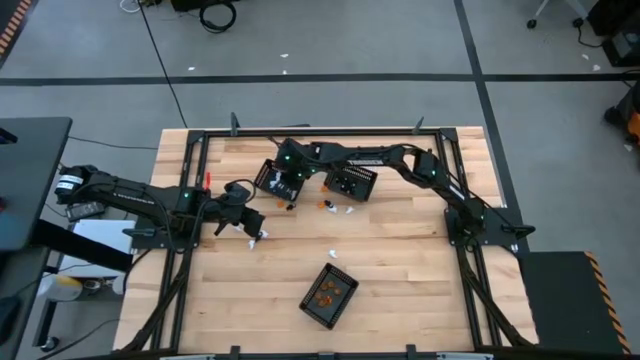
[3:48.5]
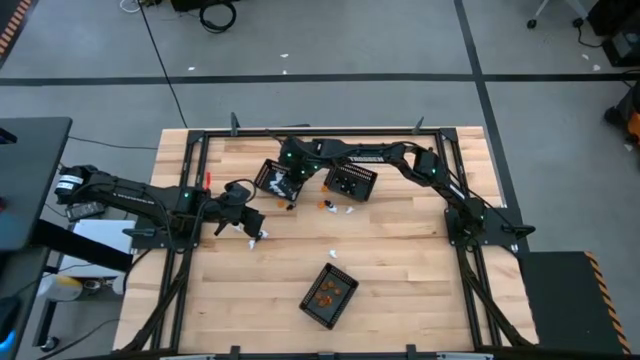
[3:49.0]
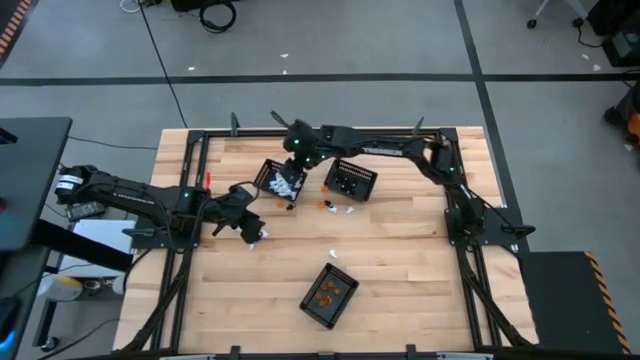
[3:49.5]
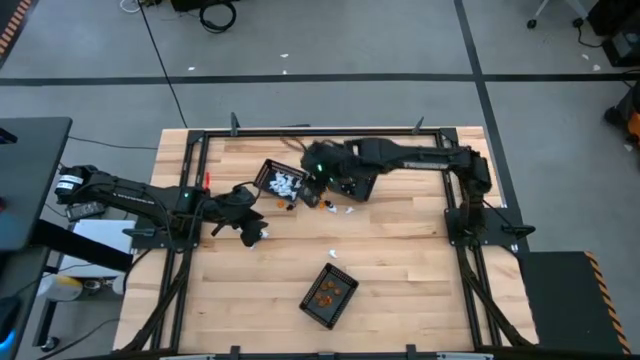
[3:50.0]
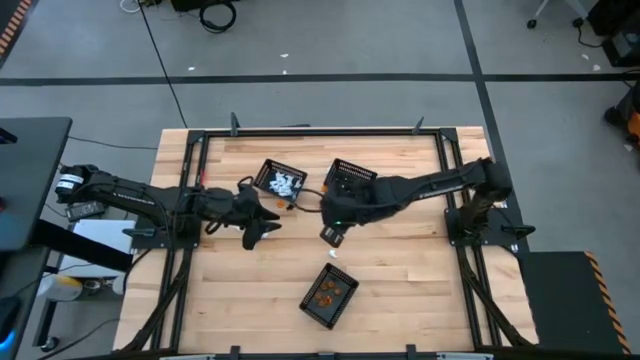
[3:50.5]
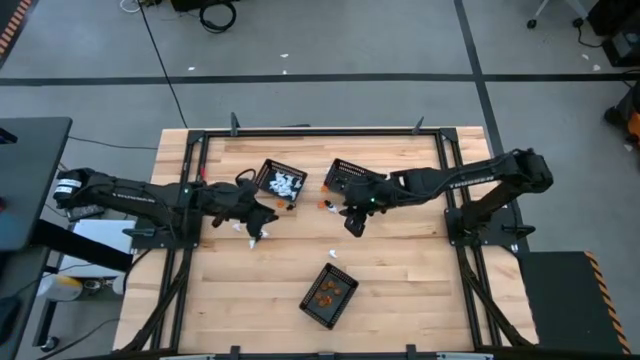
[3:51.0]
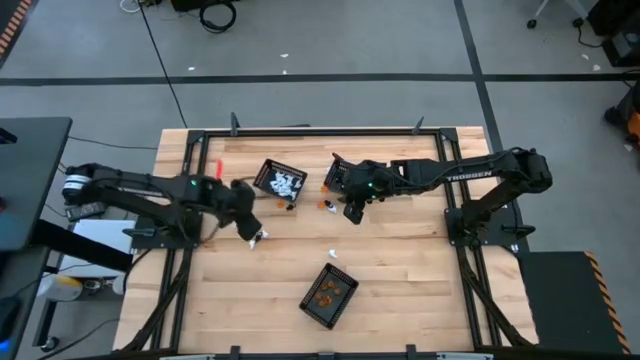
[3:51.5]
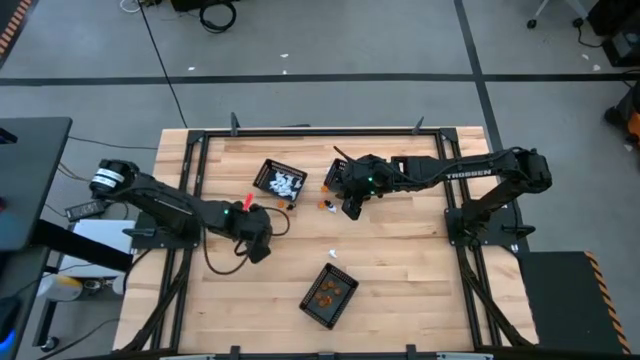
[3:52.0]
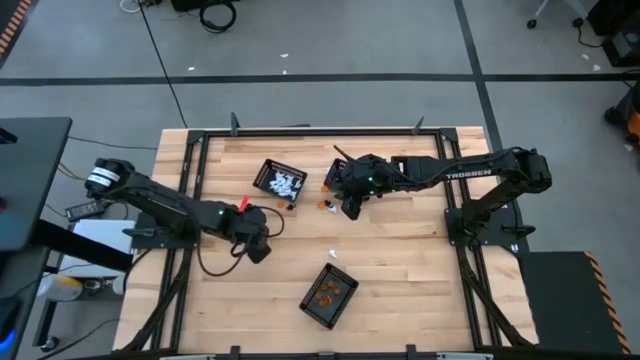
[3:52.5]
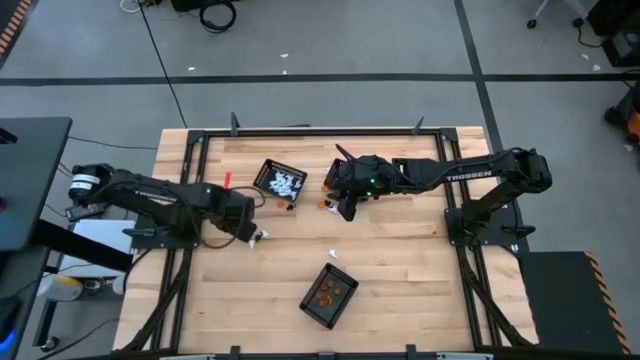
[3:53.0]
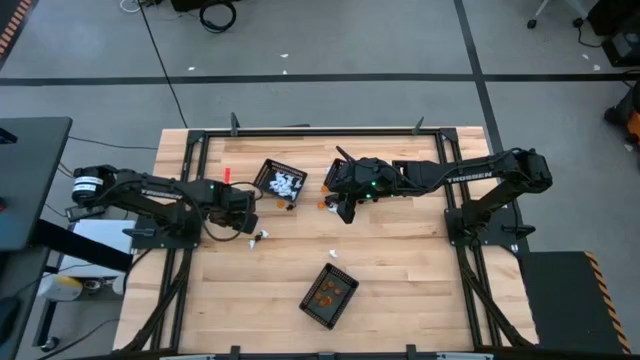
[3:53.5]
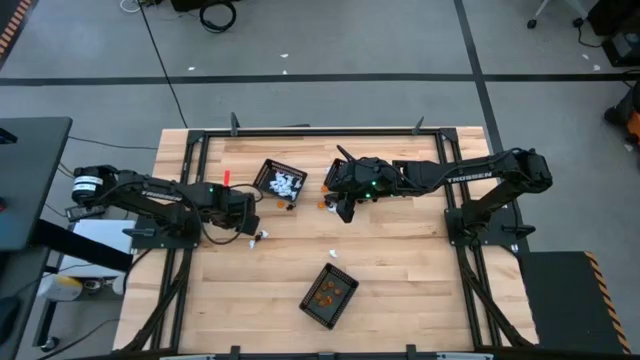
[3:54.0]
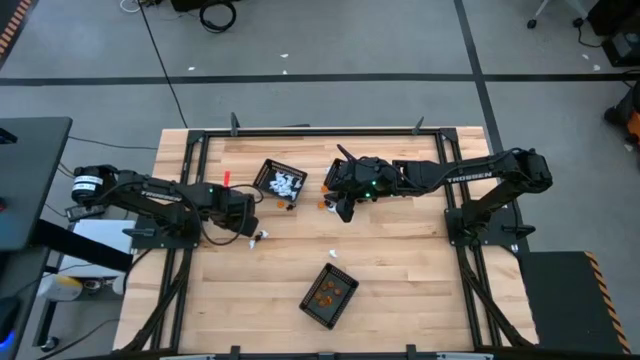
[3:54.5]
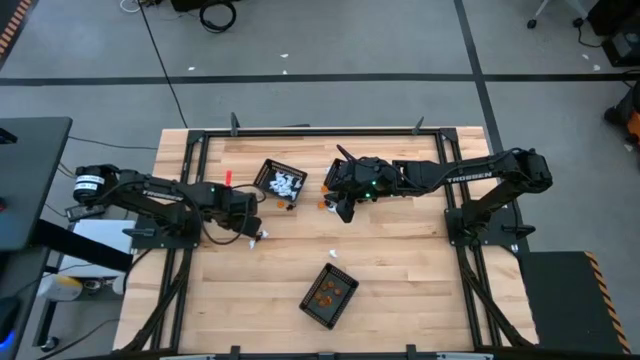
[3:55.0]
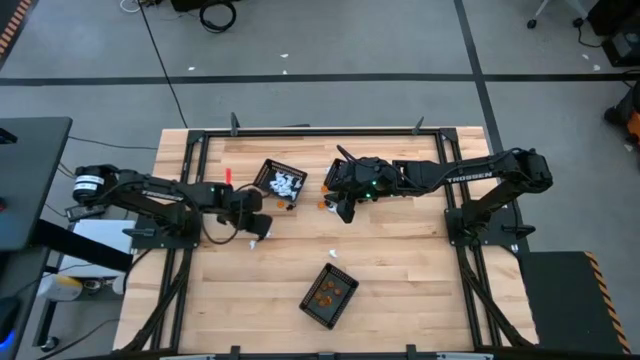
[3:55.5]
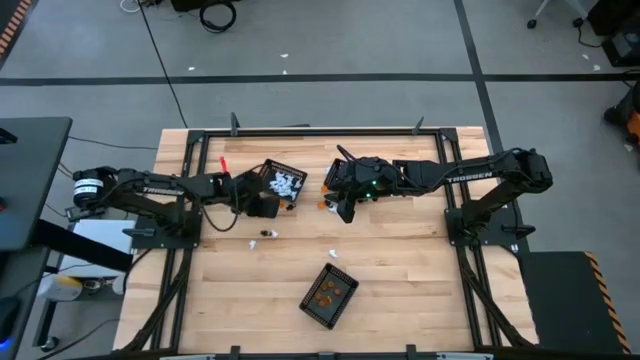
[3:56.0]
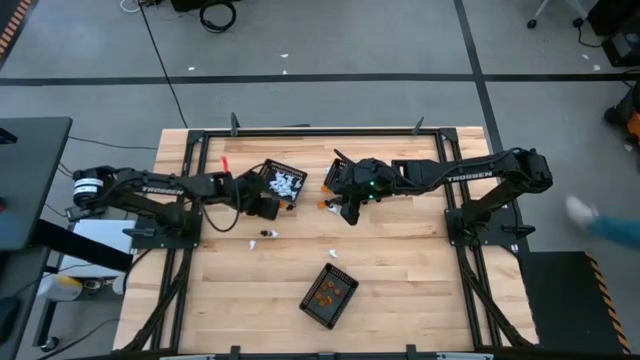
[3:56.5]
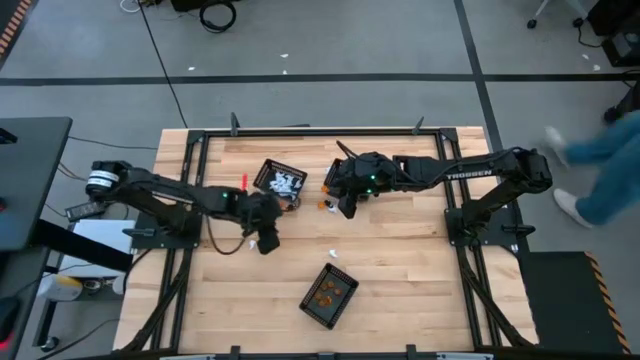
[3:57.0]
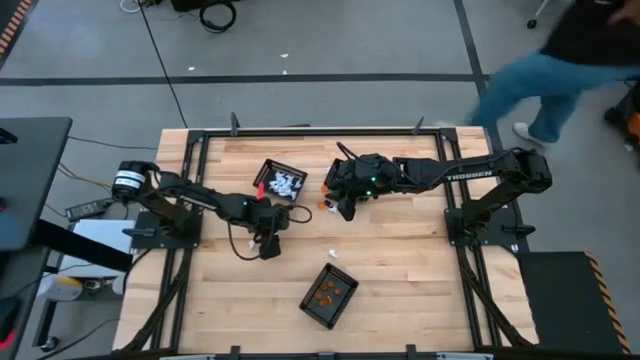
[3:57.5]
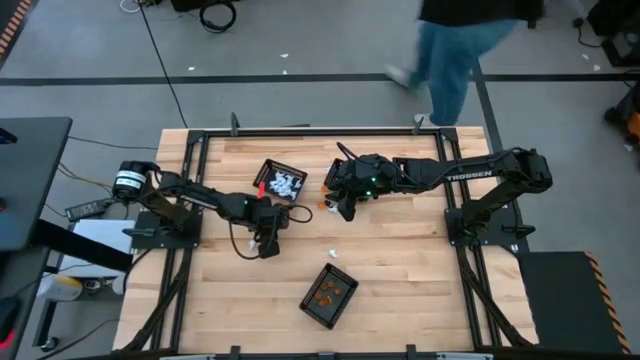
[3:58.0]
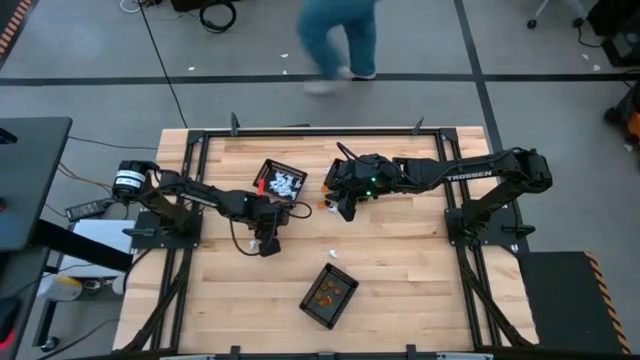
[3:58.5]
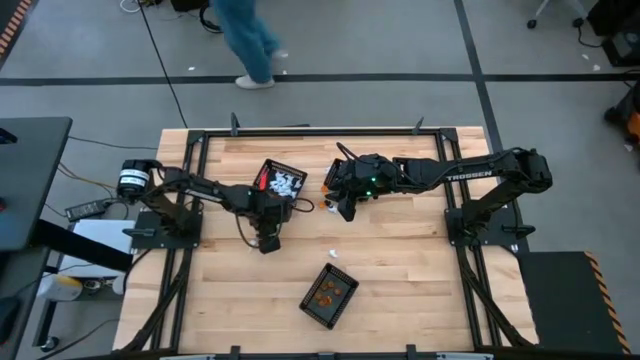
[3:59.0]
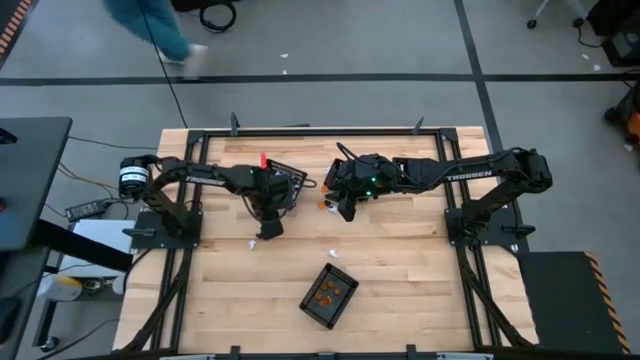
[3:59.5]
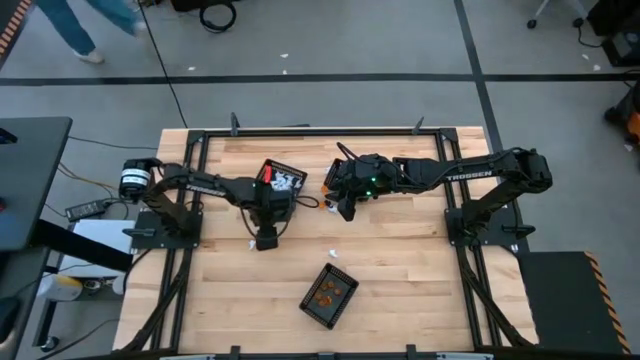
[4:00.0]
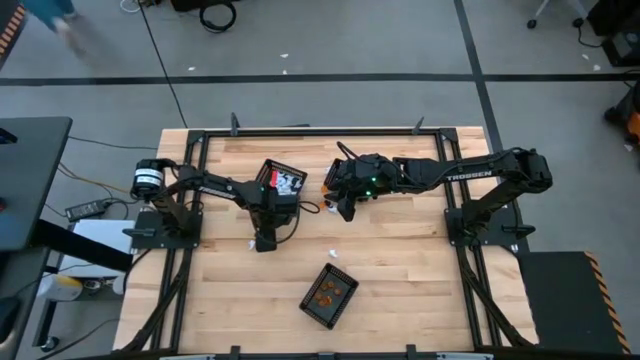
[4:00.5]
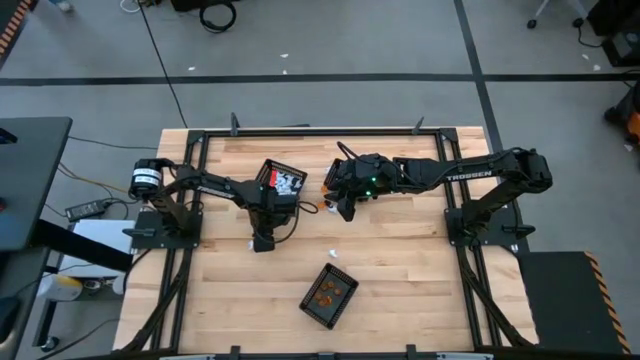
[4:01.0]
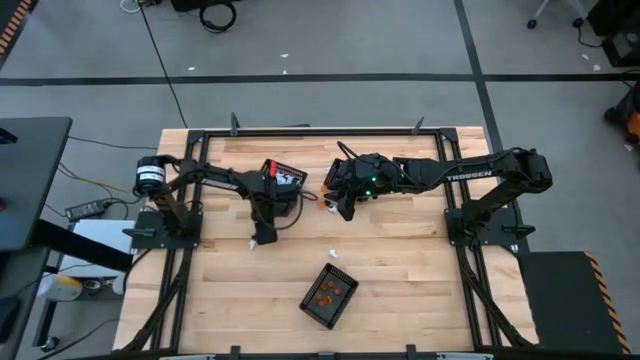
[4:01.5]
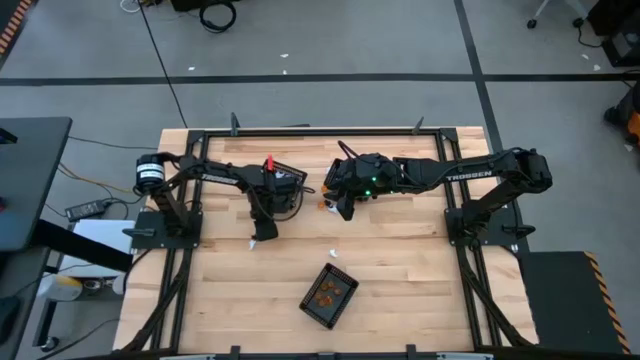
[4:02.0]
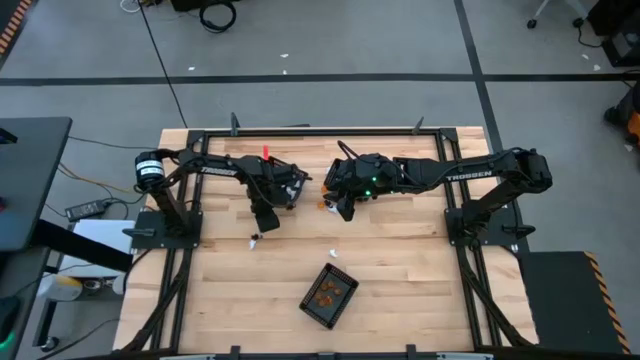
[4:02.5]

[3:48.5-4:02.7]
Task: Sort Halloween decoration
Put the white ghost toy into the top left black basket

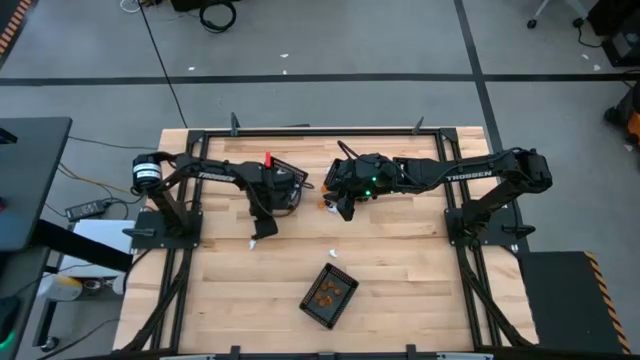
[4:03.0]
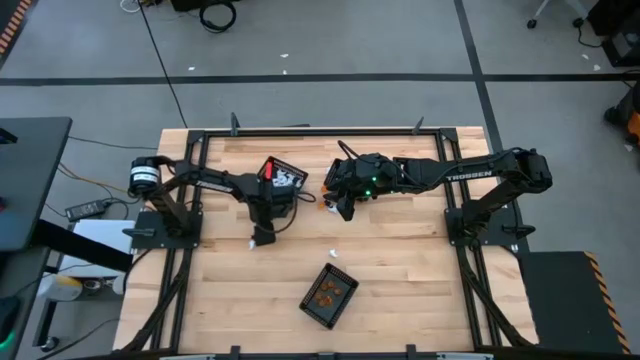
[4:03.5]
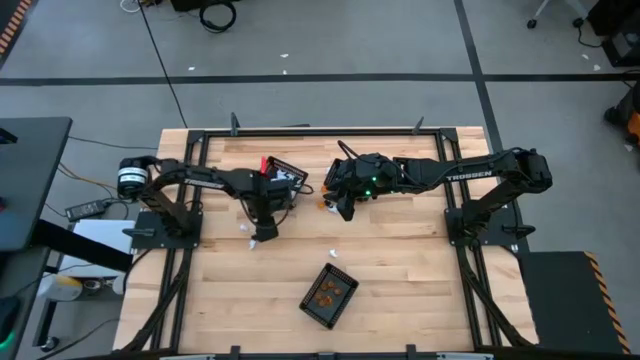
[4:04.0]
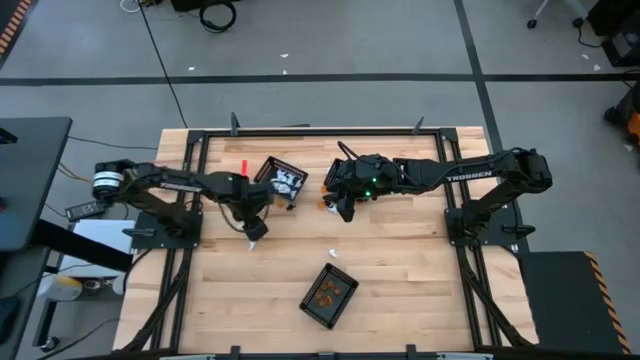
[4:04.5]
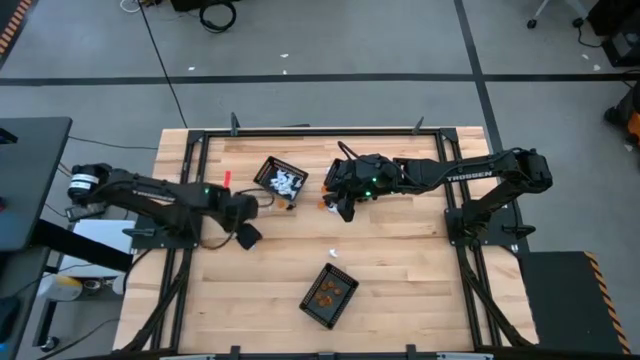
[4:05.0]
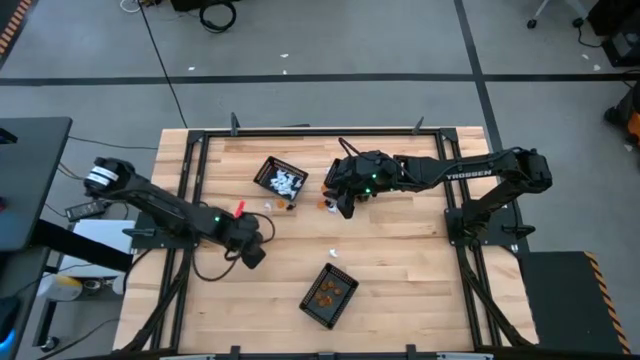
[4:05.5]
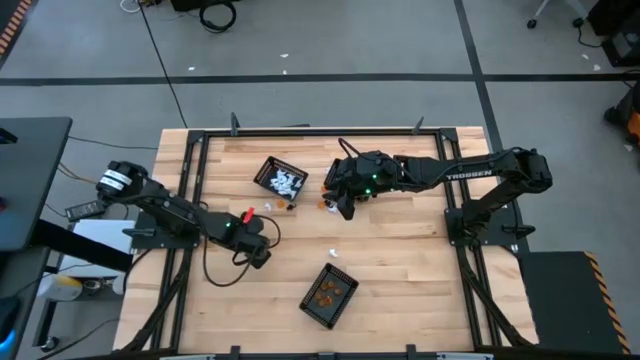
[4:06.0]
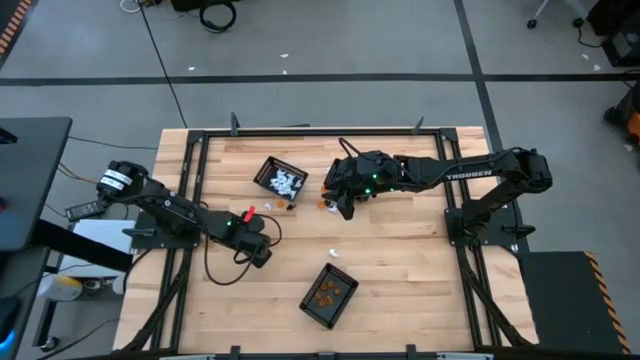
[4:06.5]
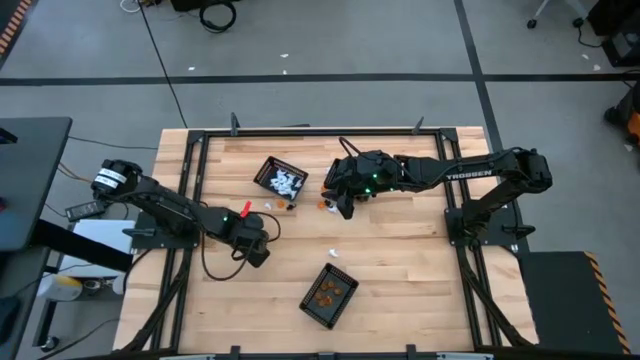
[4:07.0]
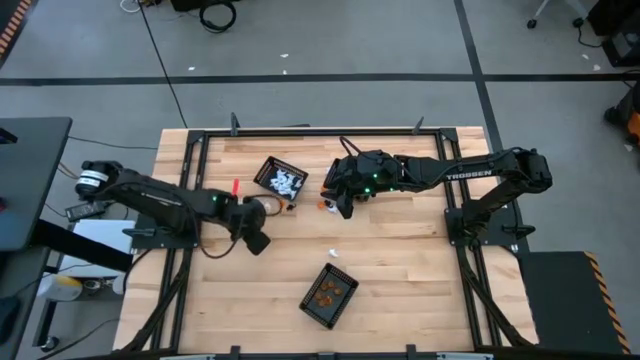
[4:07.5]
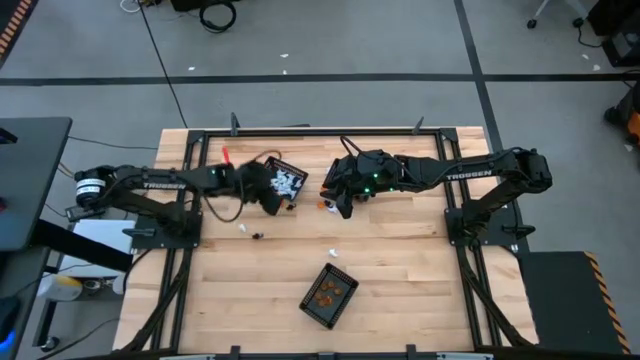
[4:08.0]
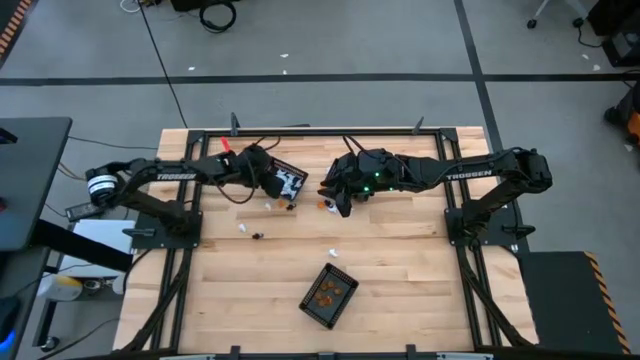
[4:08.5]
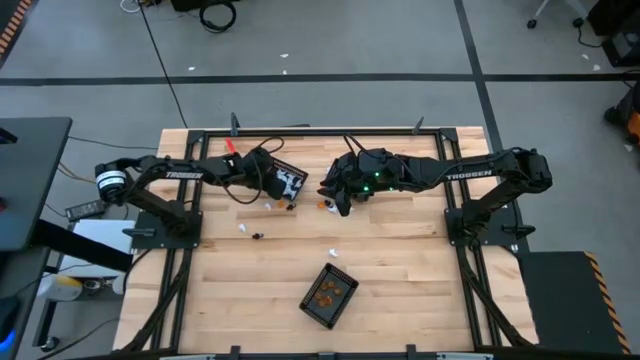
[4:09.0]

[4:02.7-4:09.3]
Put the white ghost toy into the top left black basket

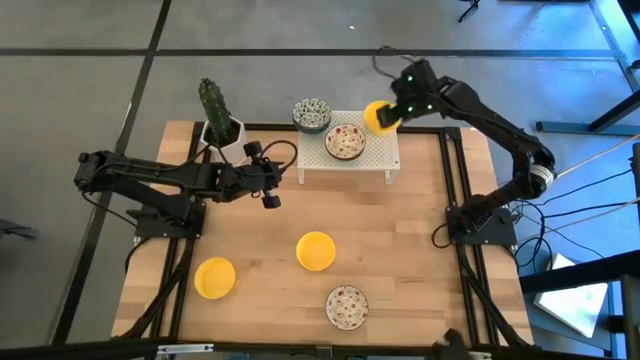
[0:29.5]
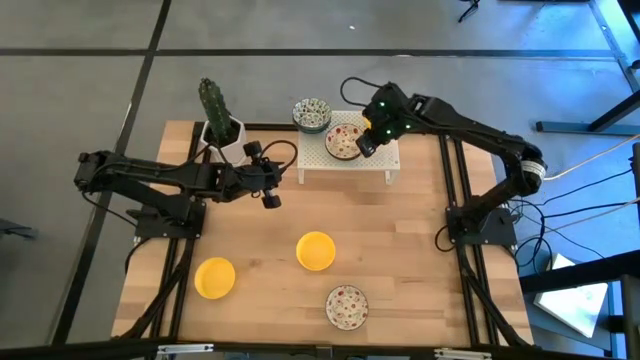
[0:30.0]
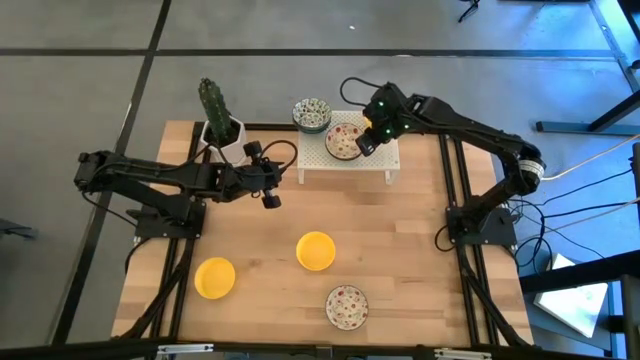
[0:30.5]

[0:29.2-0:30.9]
Task: Pick & Place Mini bowls
Adjust the red white stacked bowl on the shelf
